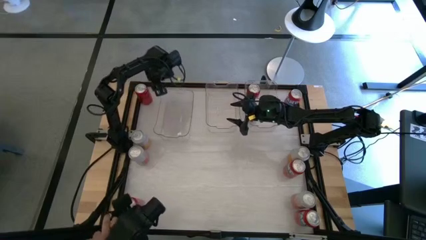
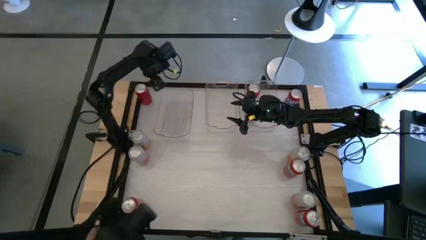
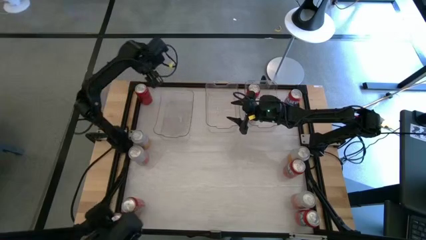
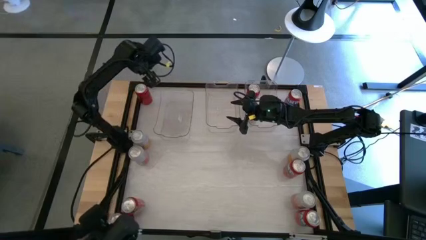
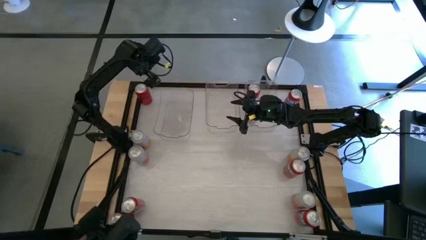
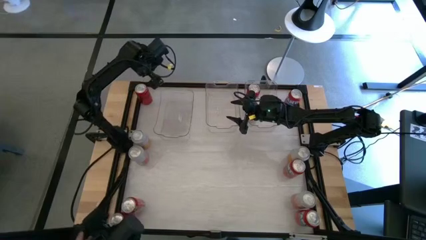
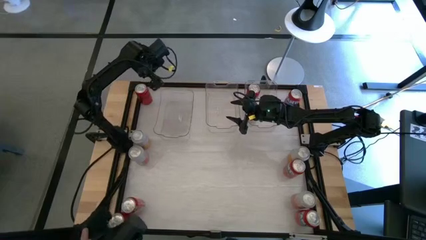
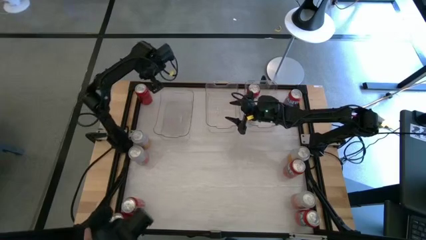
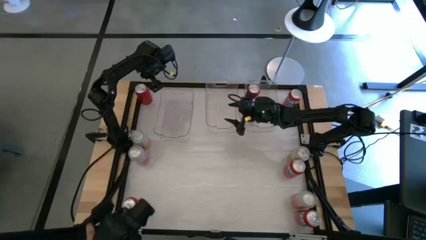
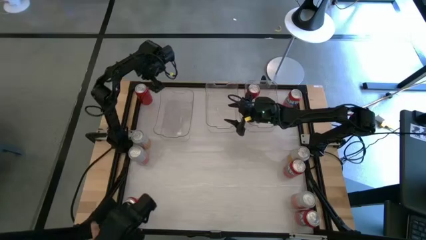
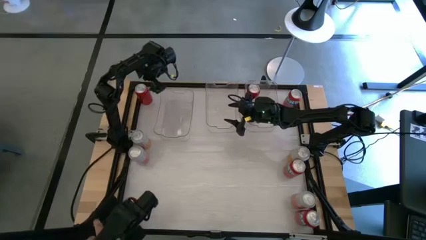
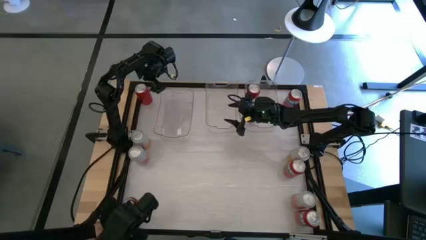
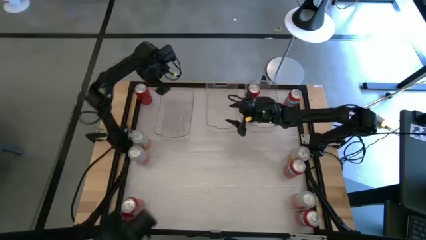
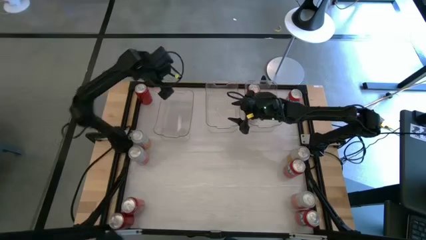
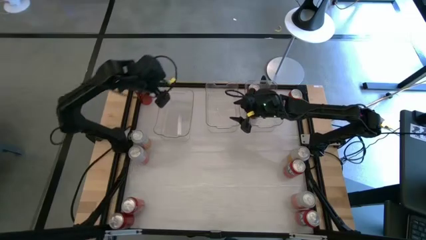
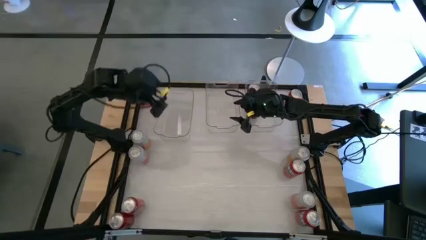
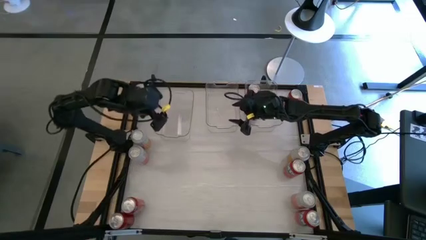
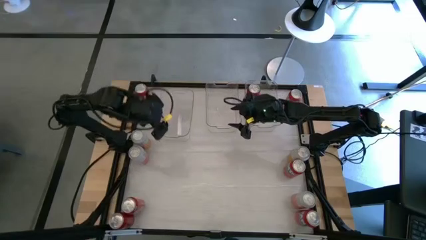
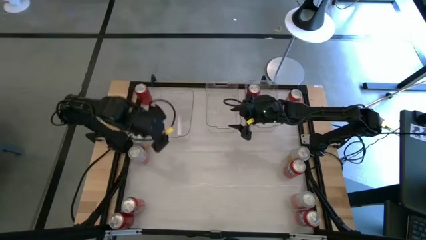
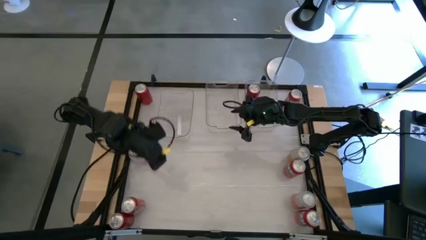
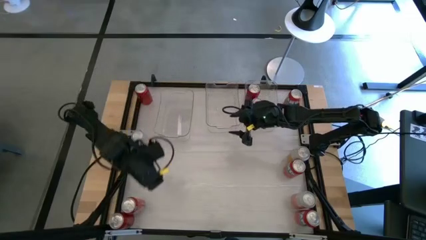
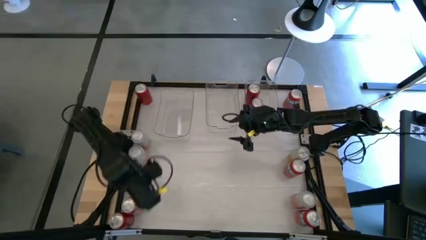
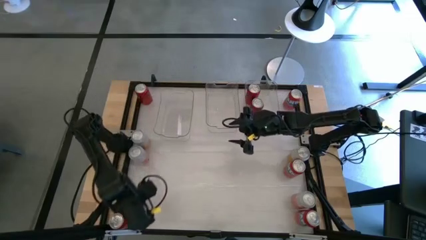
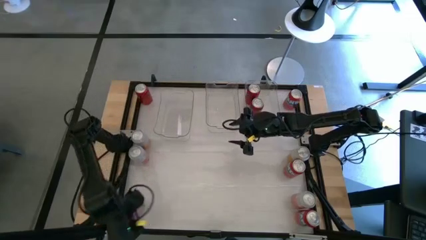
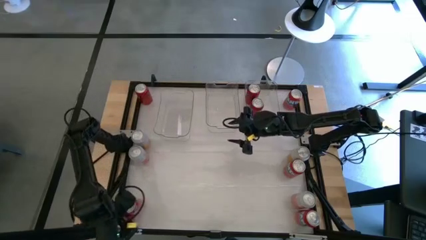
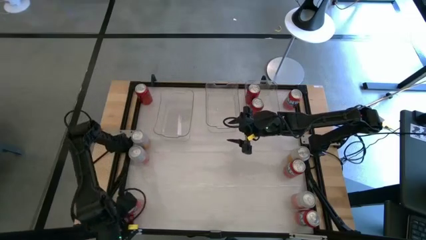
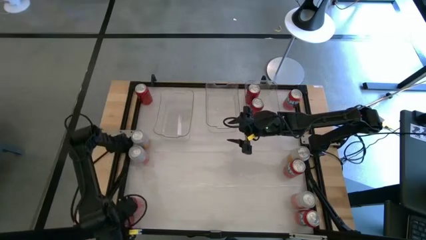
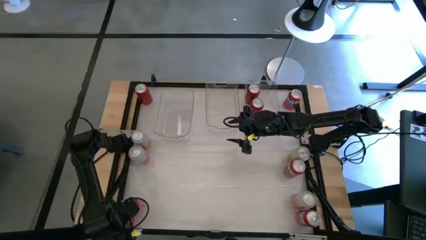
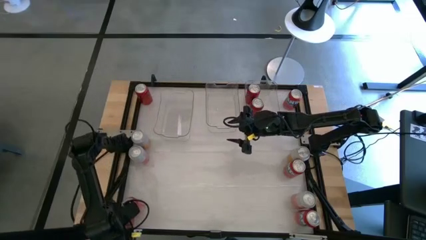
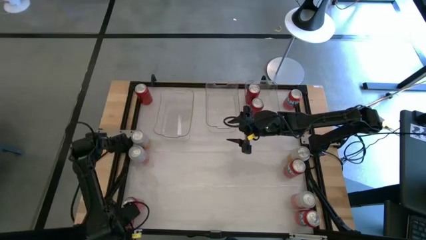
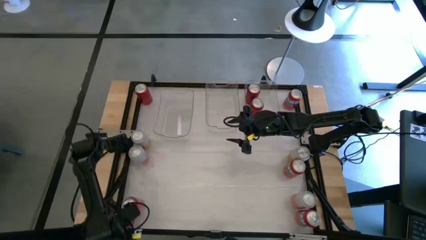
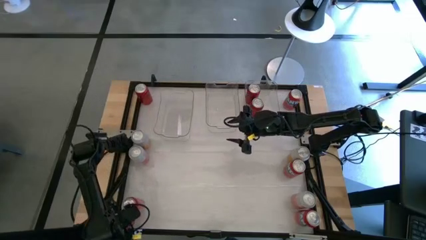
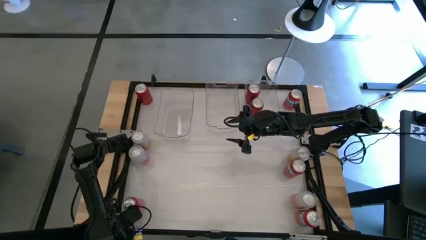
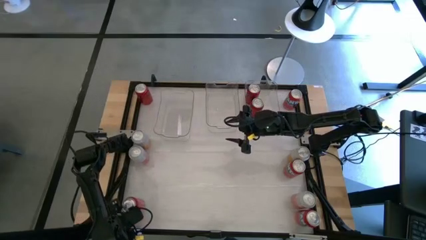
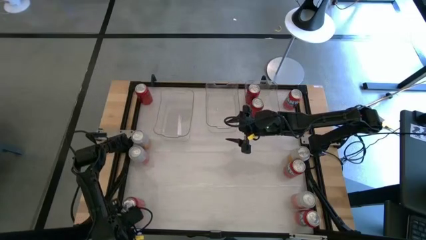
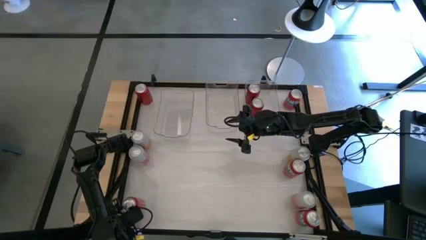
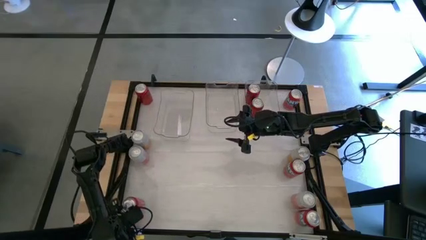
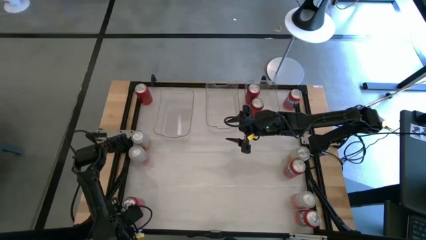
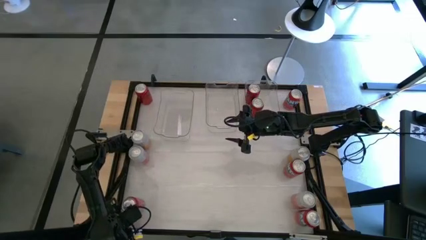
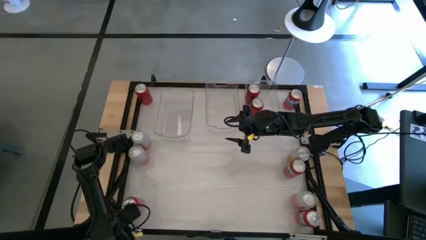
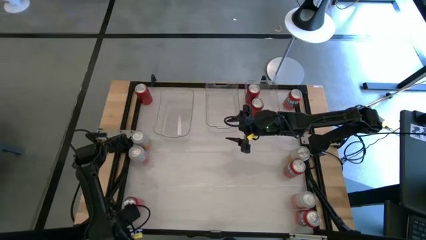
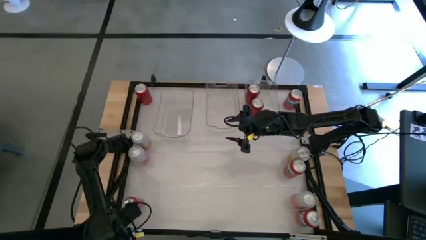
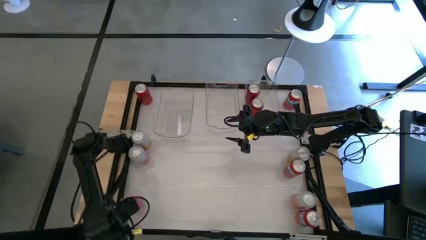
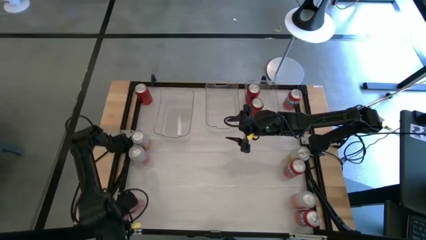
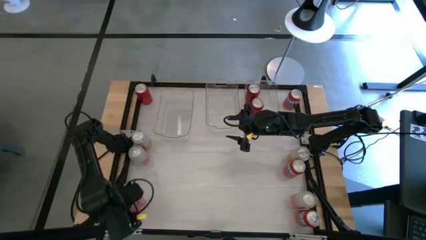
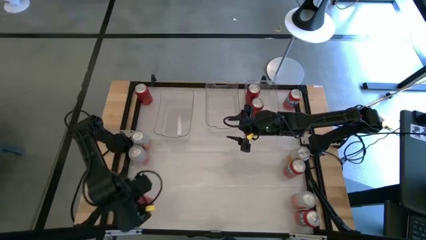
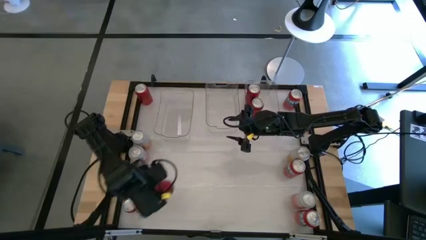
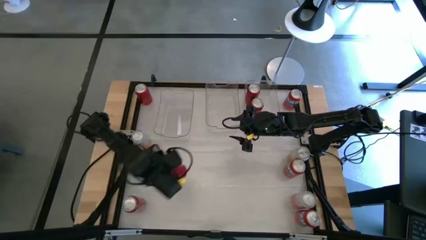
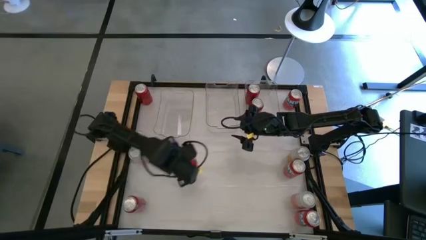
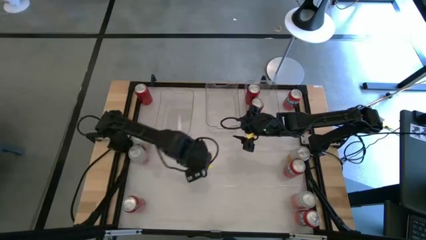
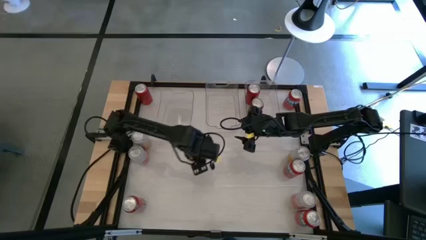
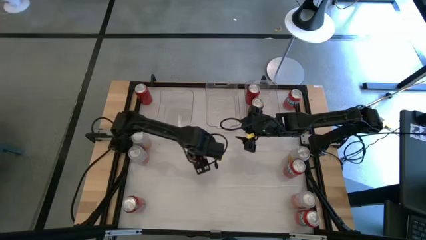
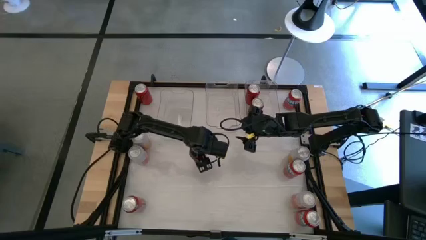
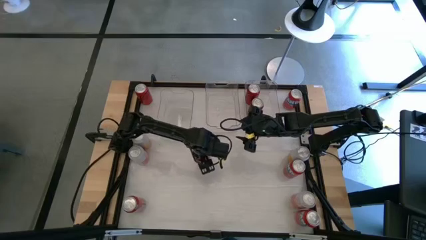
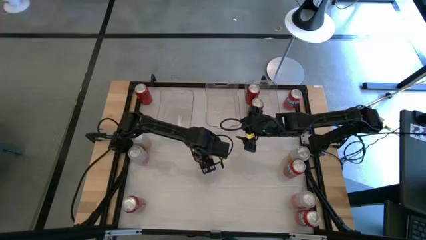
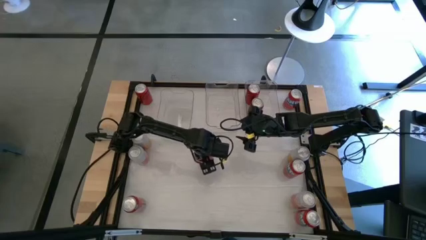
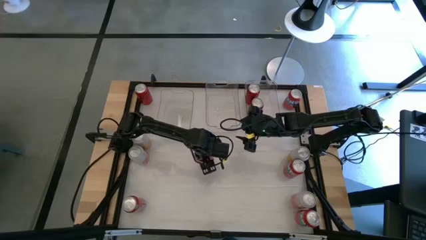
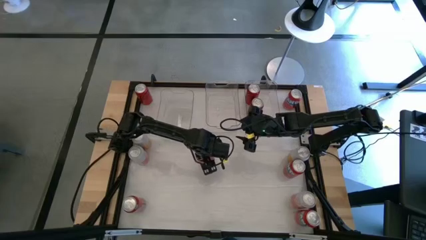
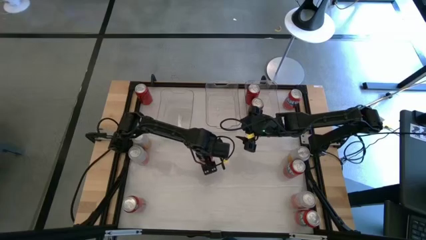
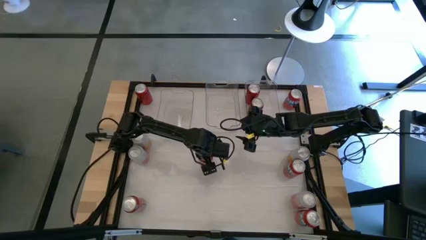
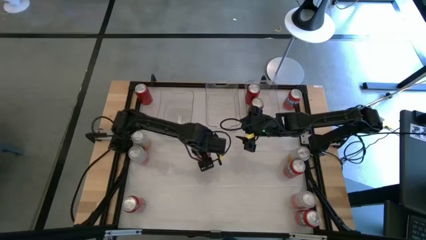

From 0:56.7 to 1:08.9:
Task: Sort soda cans
Move the bottom red black soda can to the center

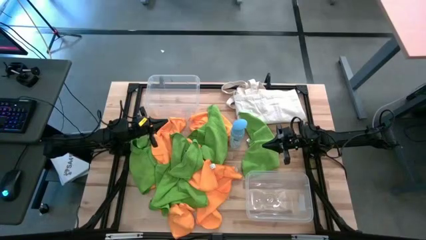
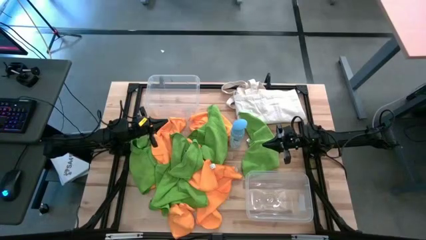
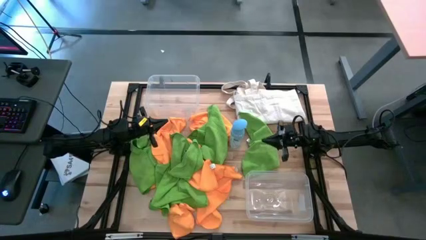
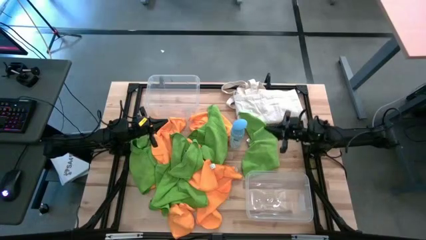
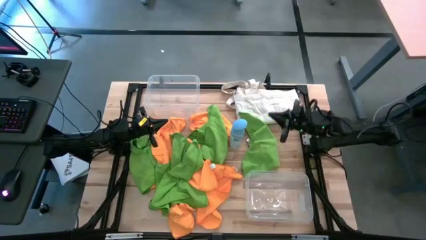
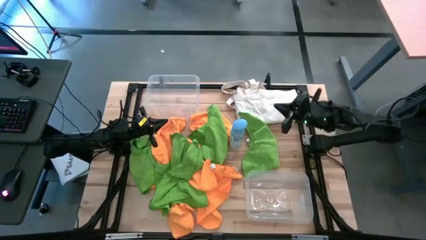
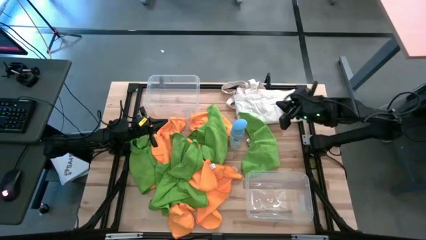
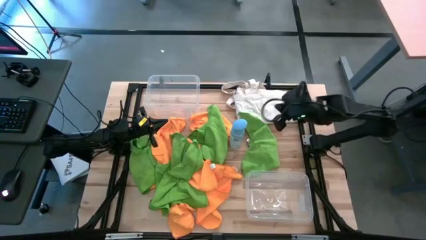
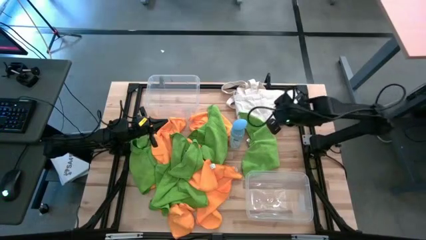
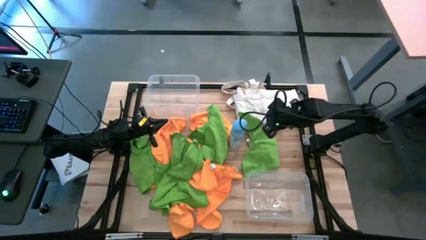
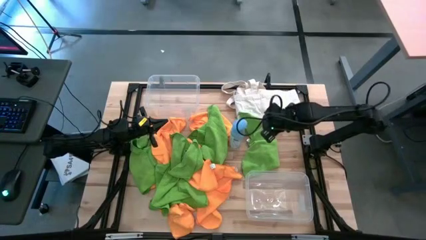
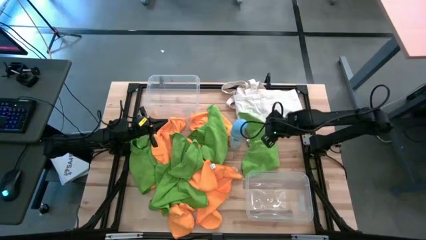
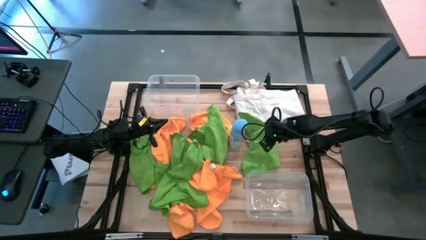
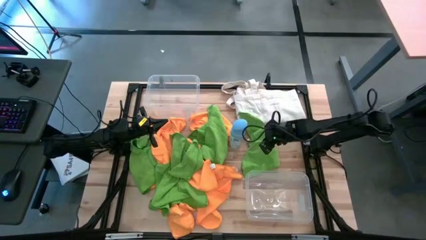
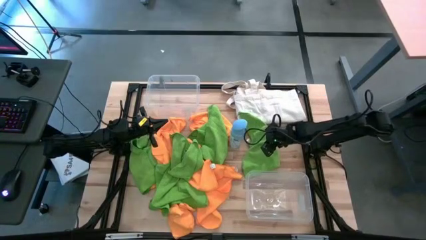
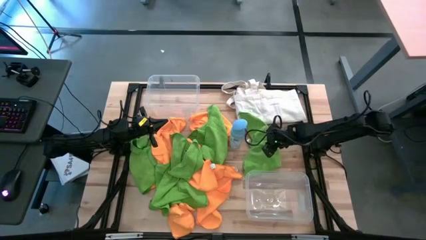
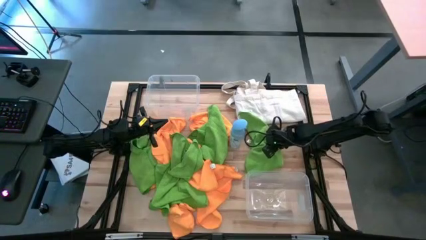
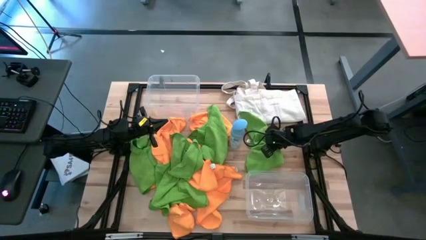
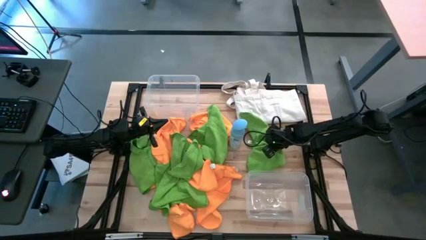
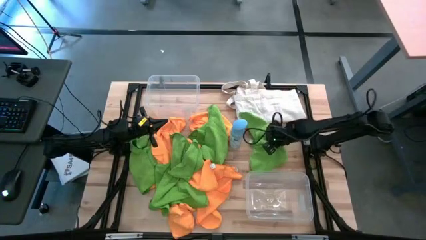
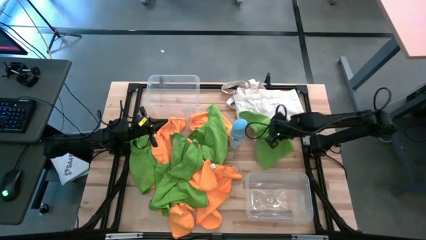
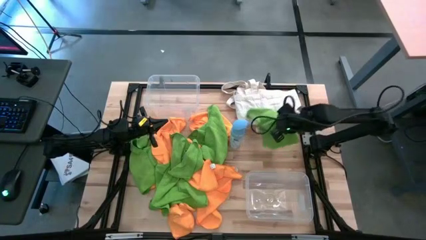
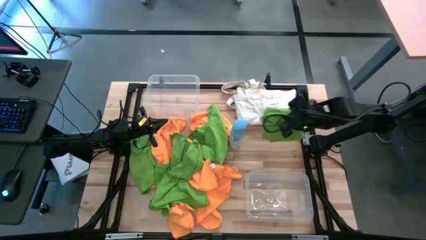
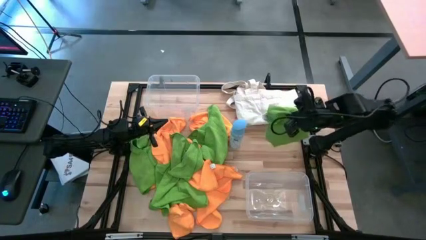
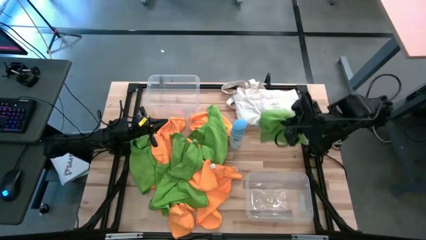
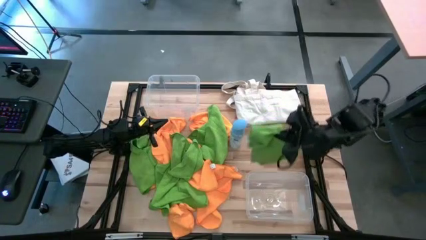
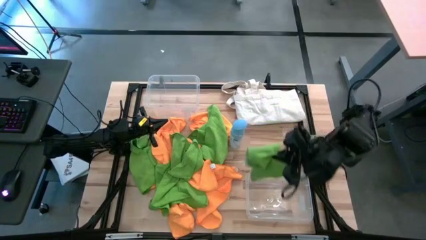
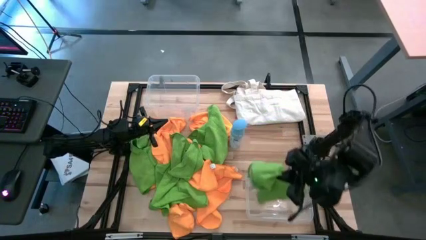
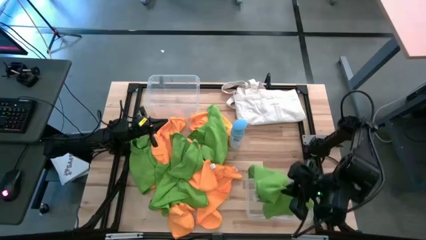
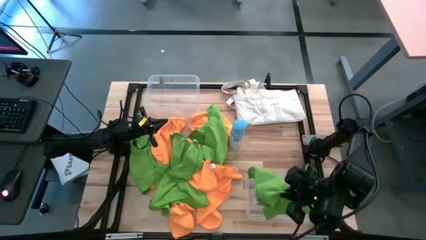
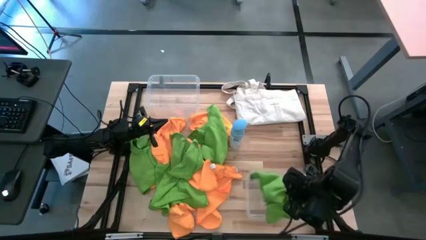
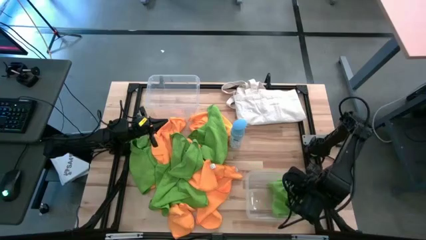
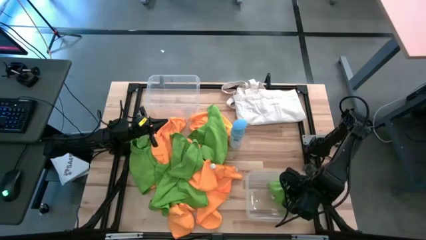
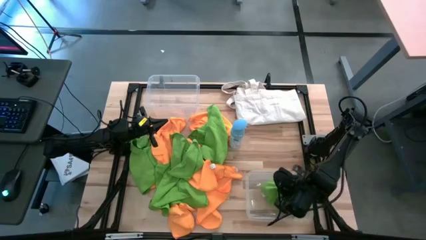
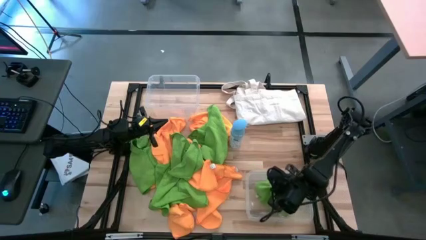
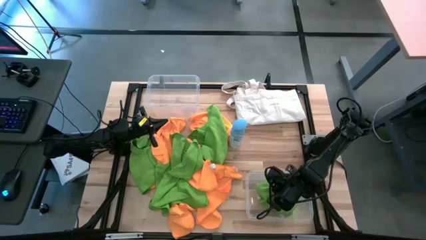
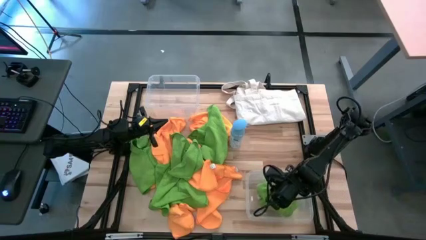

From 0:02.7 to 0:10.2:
Task: Sort microfiber towel by color & place in baskets
Put the green microfiber towel into the bottom transparent bin
